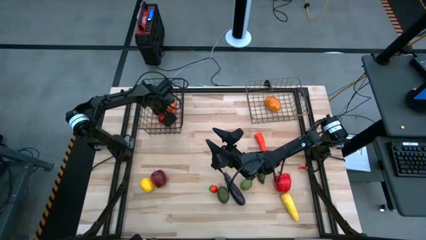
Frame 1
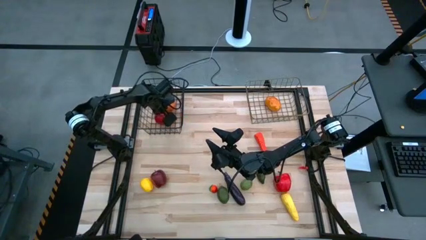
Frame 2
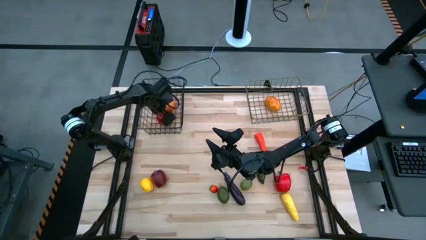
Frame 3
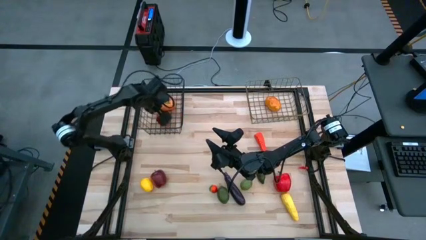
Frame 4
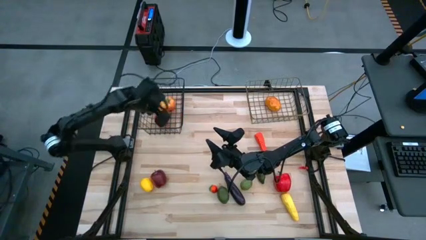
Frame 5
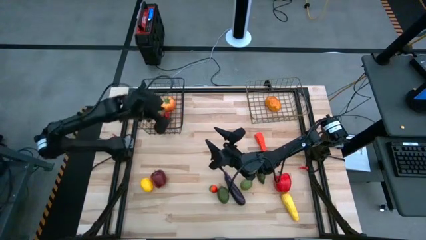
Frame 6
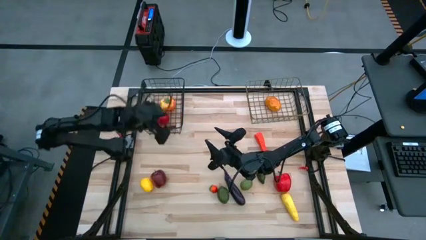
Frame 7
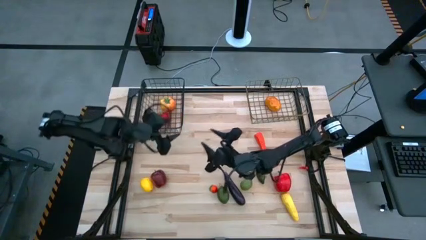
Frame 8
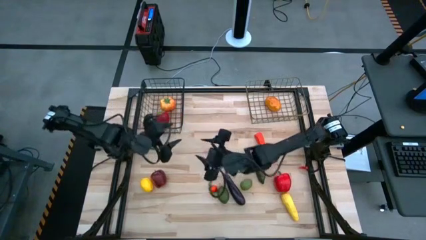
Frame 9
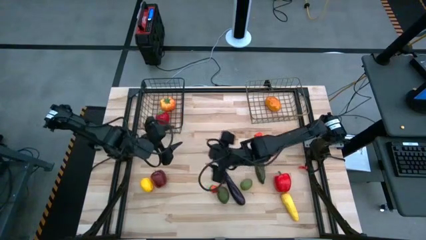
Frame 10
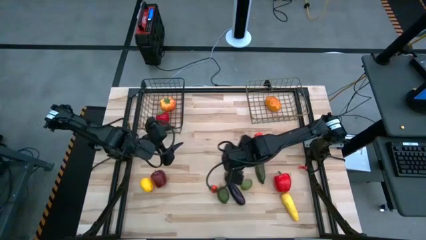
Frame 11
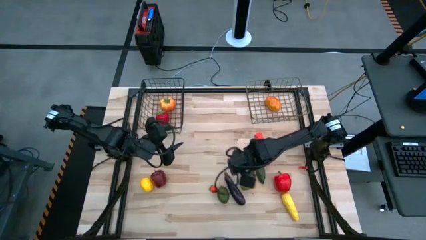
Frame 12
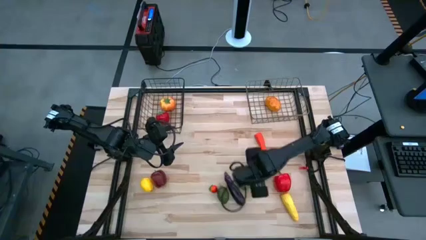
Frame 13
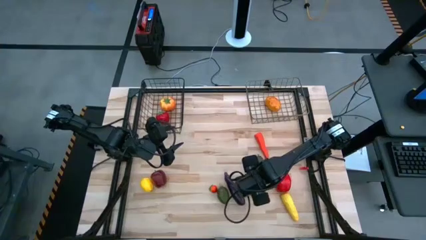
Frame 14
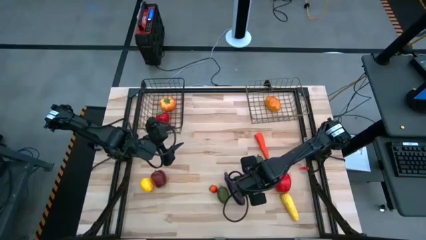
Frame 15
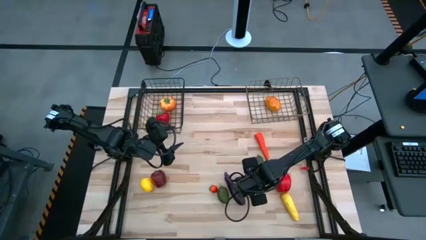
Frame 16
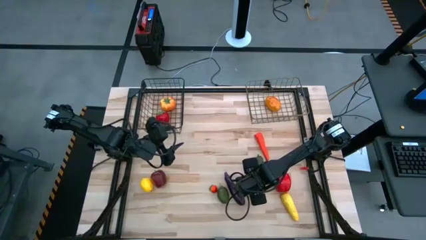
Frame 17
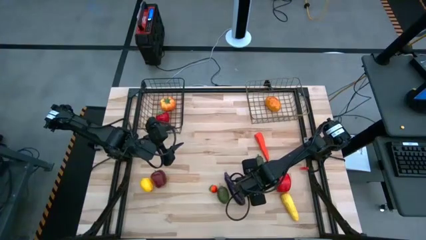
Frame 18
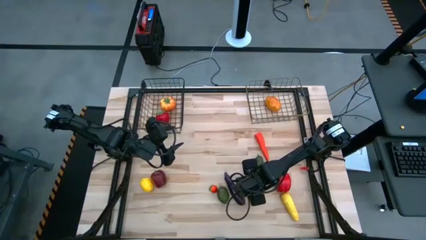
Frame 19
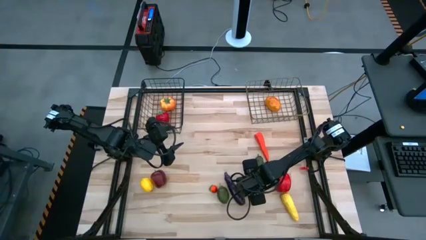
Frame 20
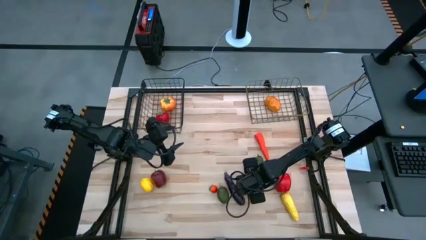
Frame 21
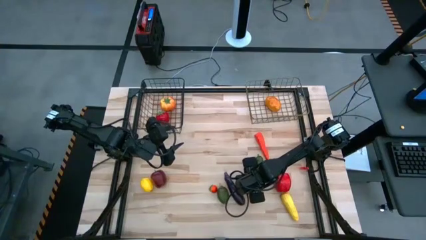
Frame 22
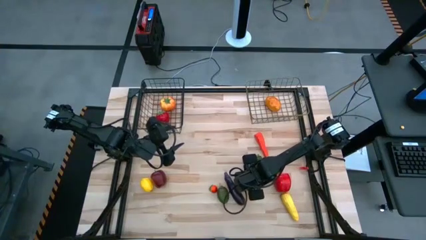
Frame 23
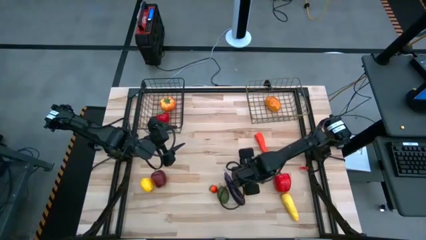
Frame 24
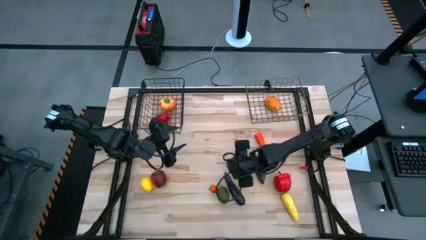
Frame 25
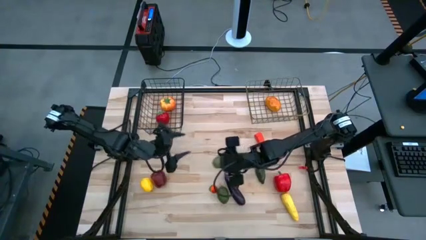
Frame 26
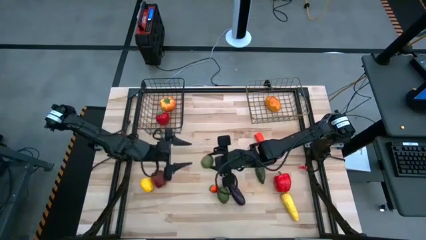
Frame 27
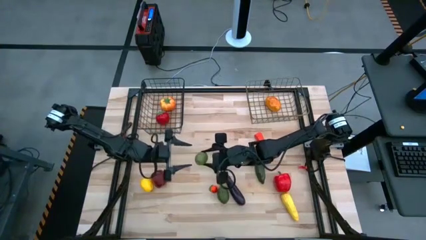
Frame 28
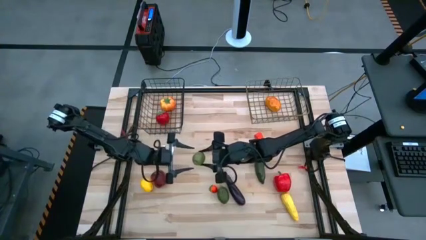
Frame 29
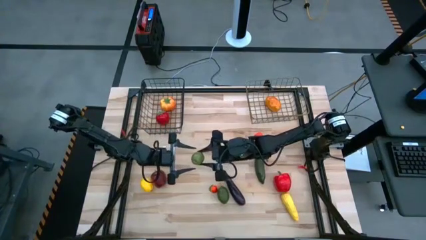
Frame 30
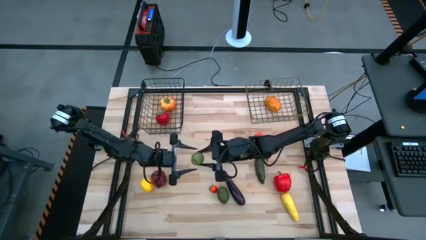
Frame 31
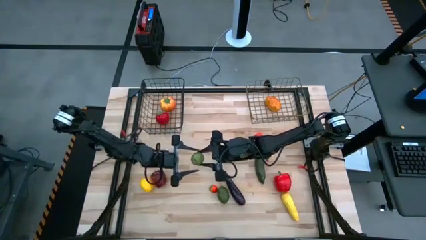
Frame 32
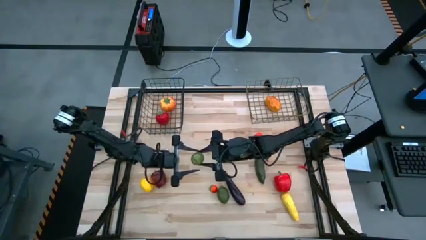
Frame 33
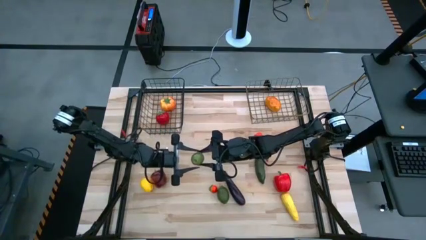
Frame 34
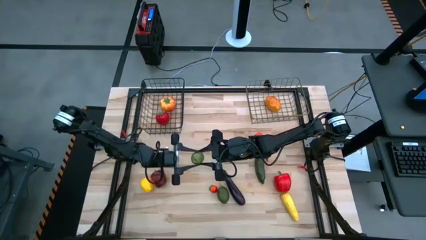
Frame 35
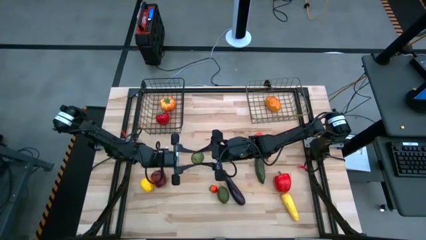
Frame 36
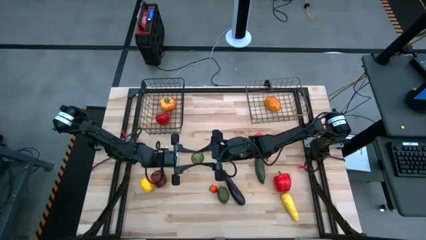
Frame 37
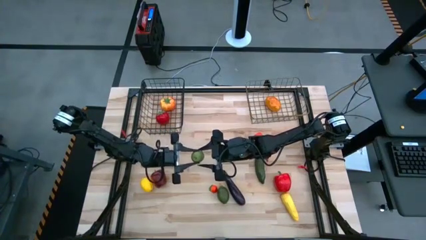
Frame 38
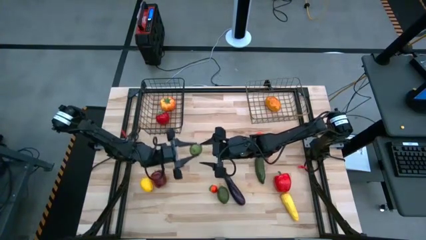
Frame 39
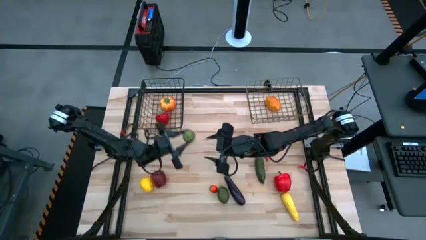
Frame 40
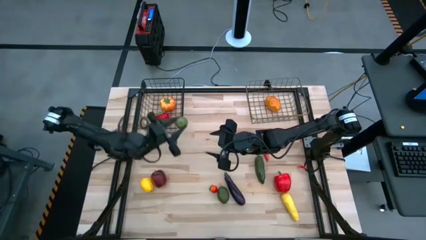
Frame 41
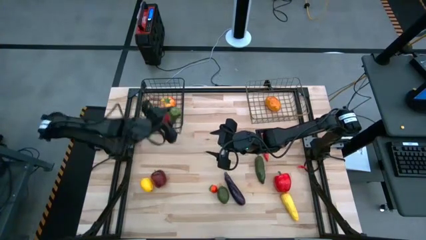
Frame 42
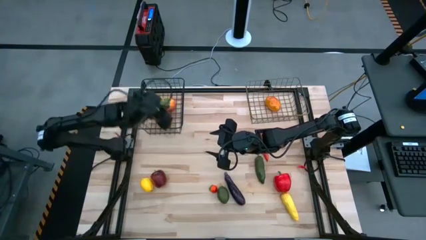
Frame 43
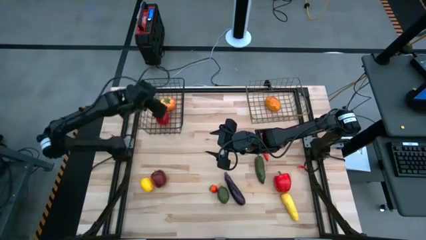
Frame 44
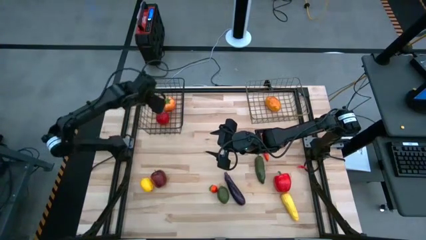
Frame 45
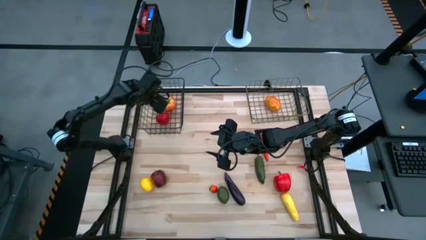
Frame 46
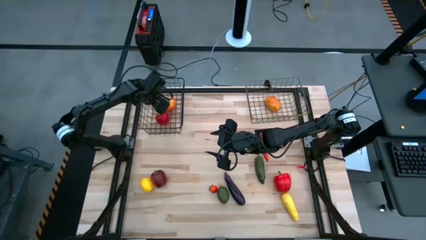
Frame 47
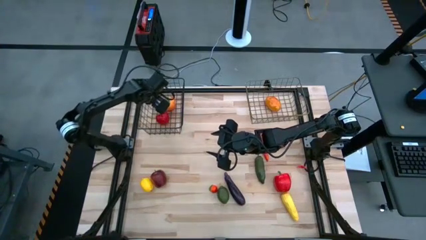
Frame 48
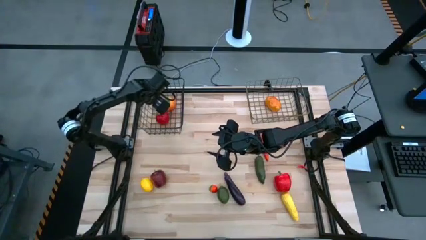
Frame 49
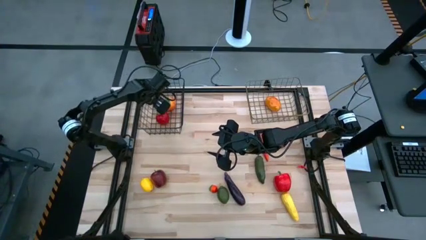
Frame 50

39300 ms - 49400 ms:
Task: Sort produce into baskets
Put the top lime into the left wire basket

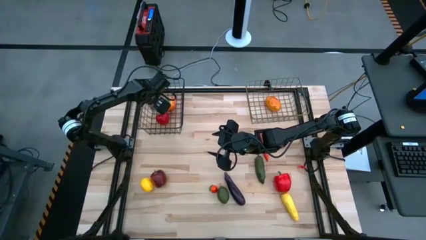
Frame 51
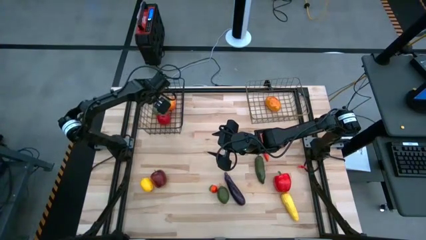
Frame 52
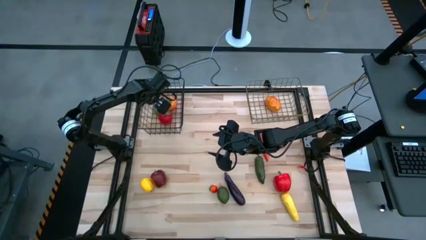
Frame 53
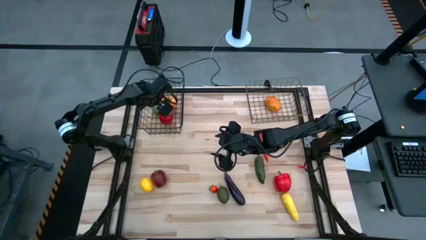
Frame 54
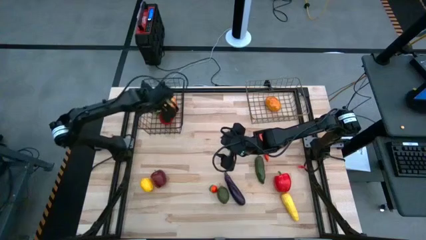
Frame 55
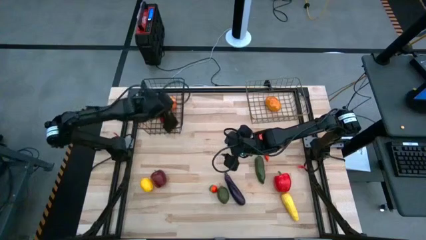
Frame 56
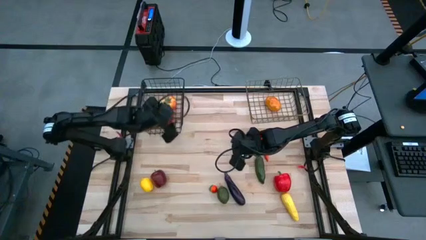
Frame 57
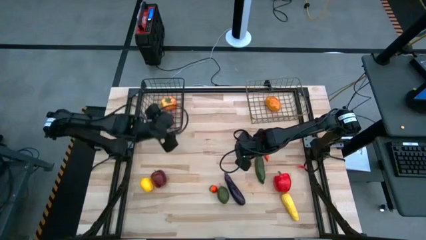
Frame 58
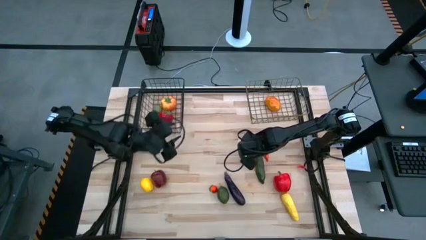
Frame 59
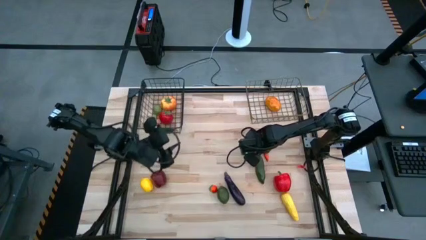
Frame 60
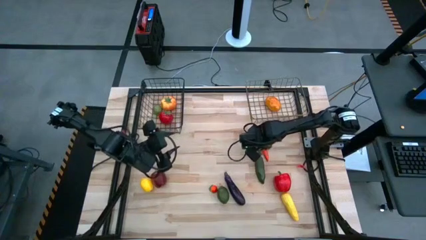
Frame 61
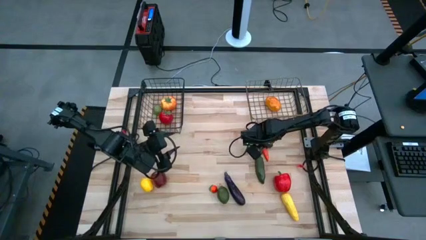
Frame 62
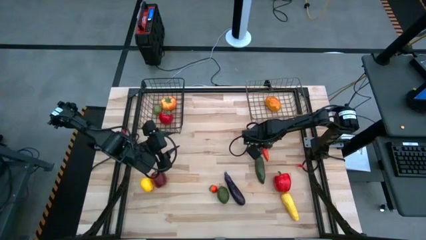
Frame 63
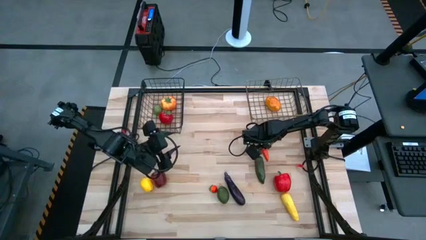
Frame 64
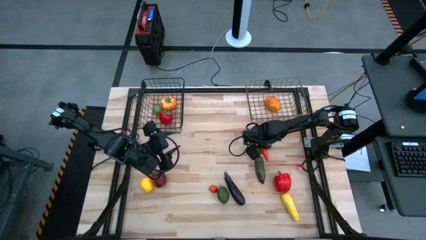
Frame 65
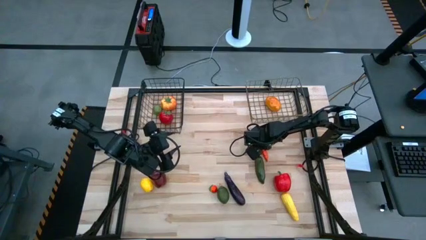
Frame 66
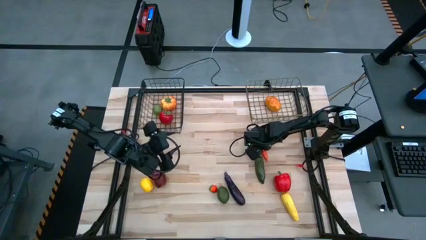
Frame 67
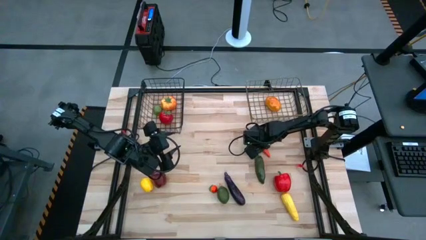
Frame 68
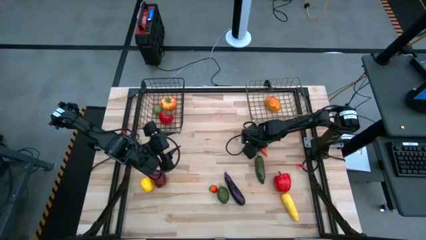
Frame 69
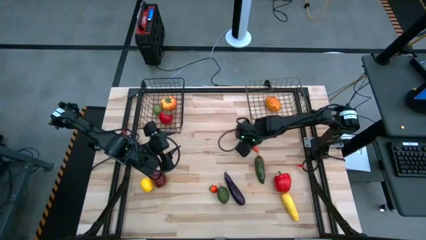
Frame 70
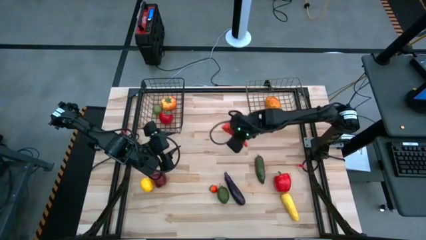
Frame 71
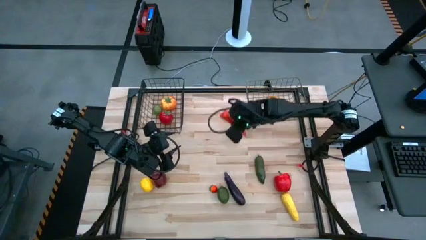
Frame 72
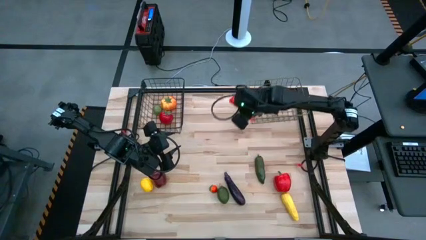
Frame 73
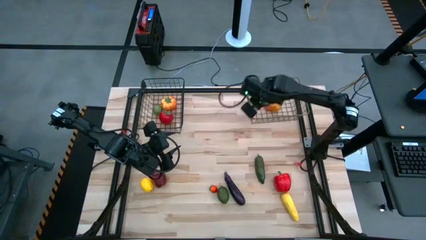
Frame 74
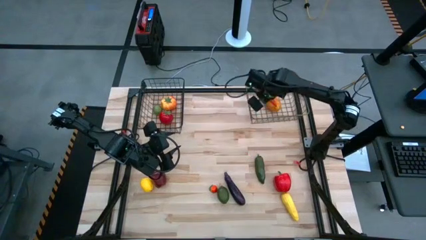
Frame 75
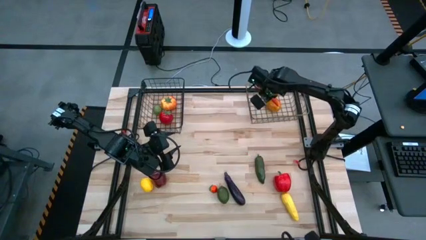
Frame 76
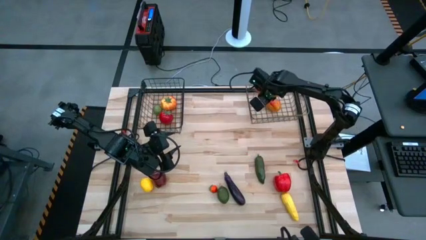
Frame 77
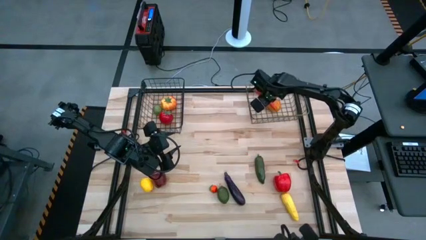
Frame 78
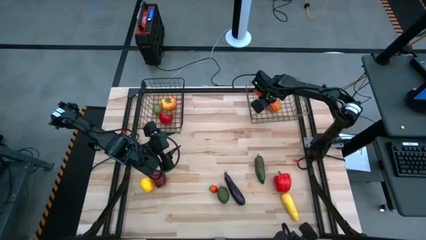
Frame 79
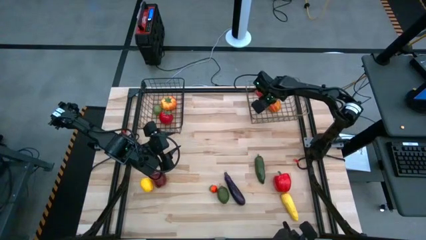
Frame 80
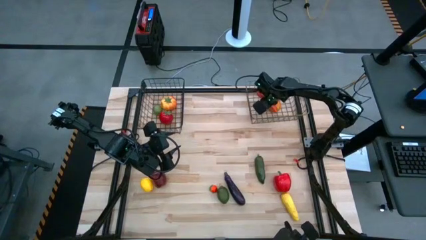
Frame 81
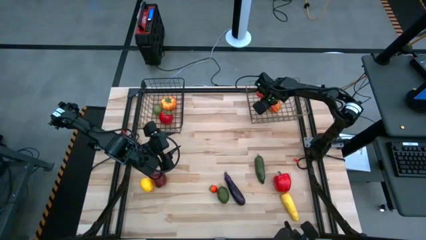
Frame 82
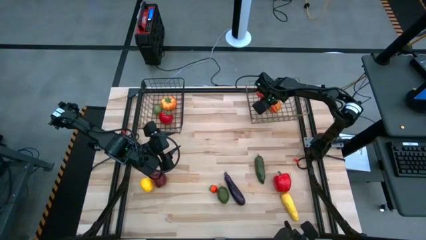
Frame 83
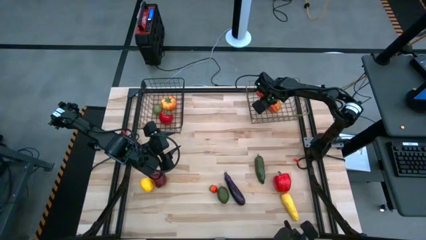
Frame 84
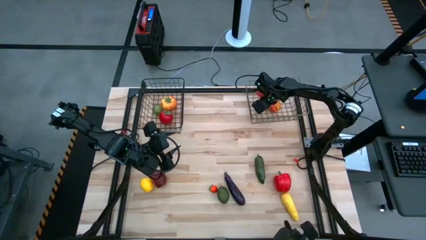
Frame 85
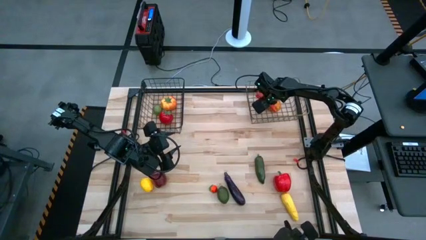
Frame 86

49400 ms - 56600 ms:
Put the carrot into the right wire basket
